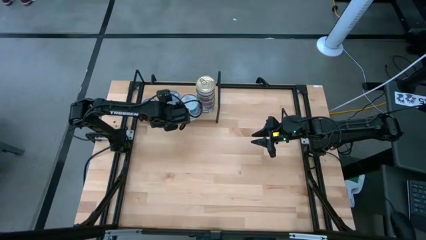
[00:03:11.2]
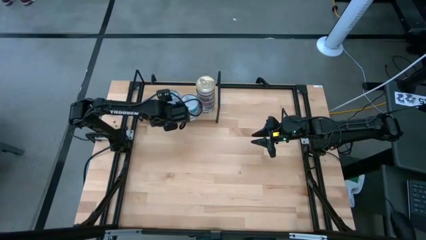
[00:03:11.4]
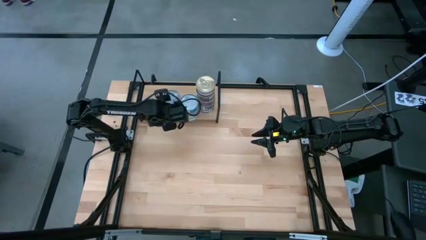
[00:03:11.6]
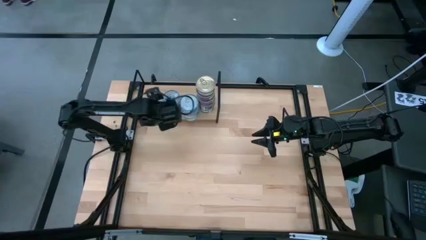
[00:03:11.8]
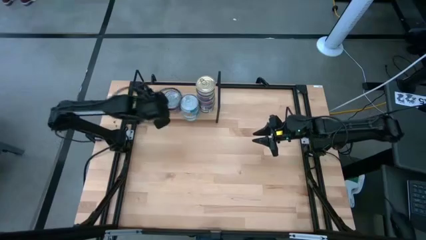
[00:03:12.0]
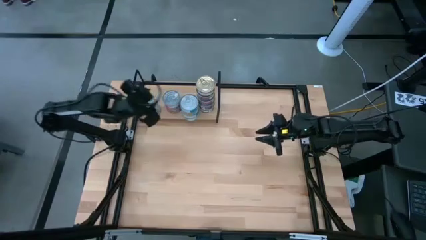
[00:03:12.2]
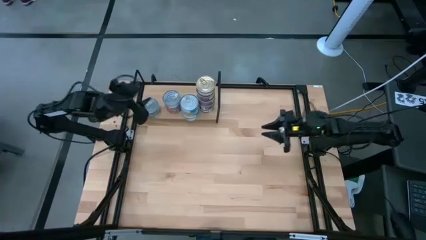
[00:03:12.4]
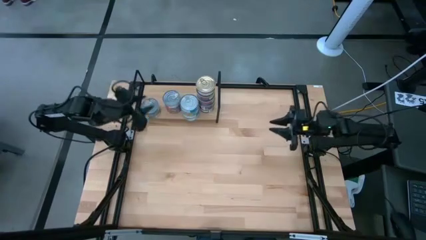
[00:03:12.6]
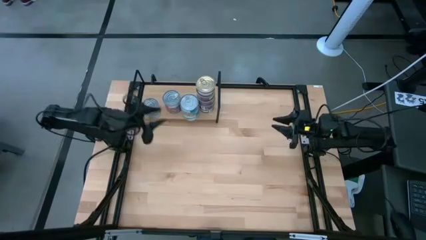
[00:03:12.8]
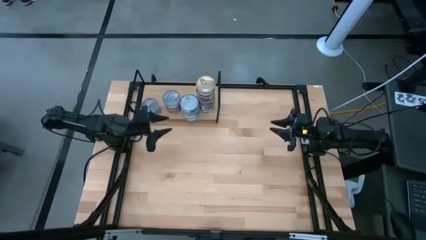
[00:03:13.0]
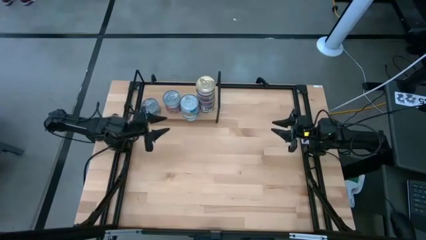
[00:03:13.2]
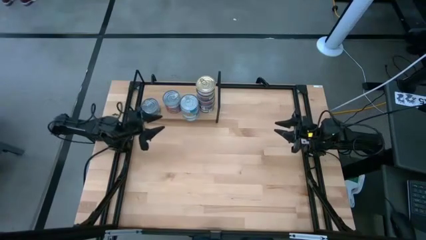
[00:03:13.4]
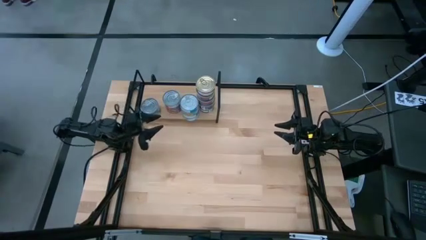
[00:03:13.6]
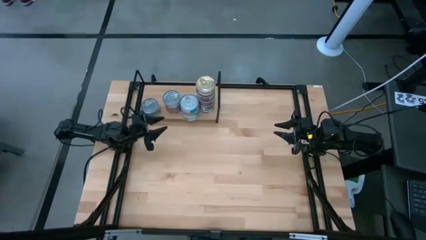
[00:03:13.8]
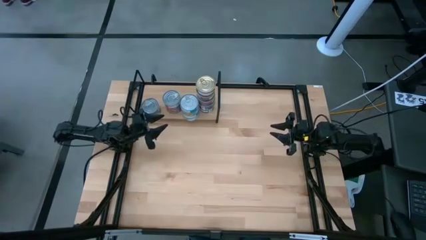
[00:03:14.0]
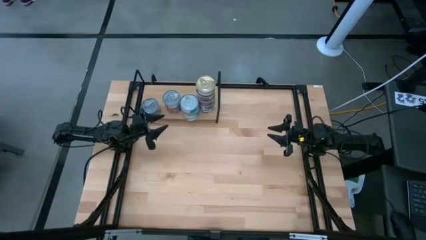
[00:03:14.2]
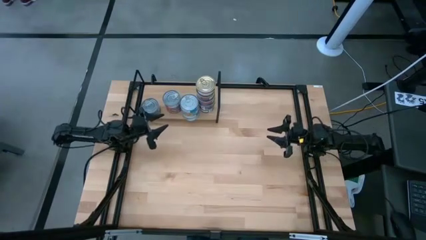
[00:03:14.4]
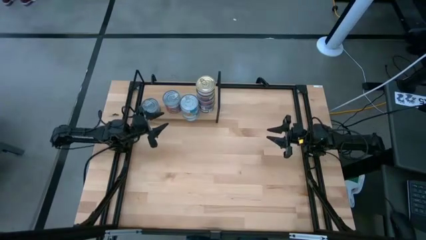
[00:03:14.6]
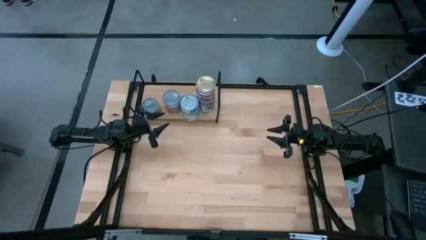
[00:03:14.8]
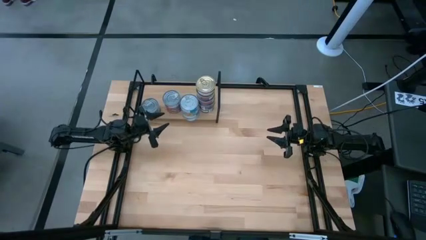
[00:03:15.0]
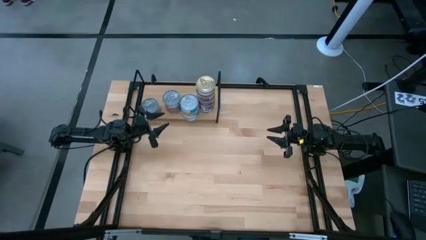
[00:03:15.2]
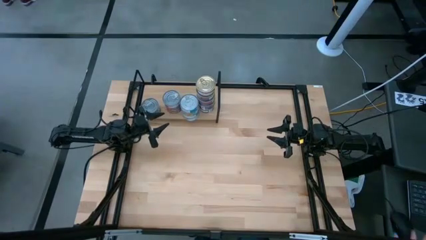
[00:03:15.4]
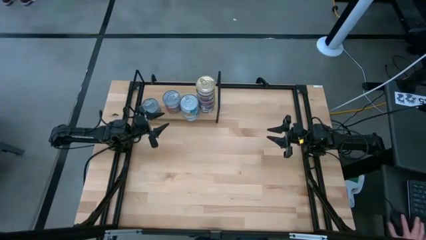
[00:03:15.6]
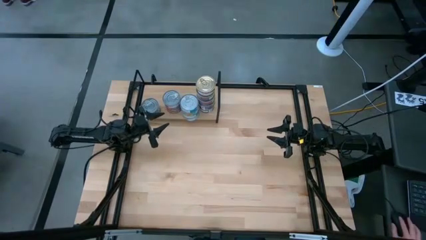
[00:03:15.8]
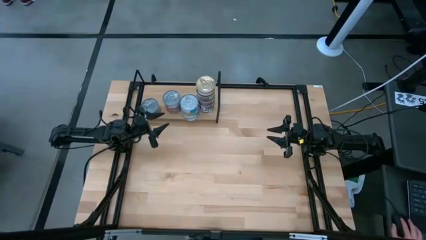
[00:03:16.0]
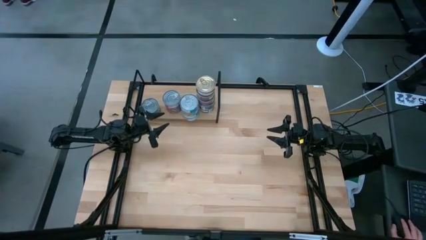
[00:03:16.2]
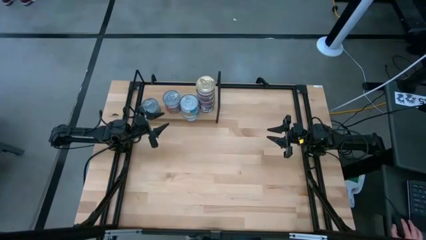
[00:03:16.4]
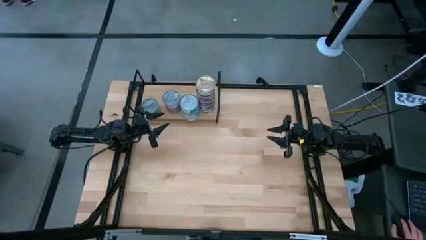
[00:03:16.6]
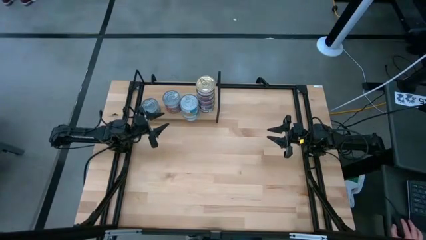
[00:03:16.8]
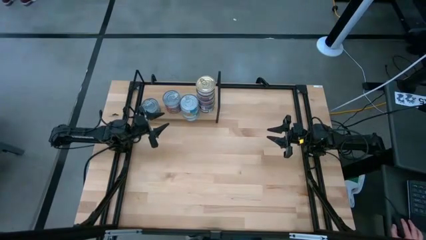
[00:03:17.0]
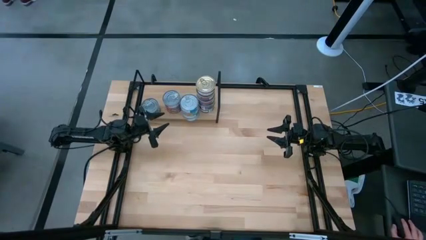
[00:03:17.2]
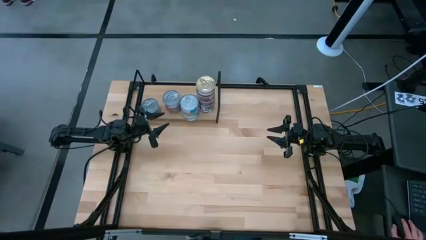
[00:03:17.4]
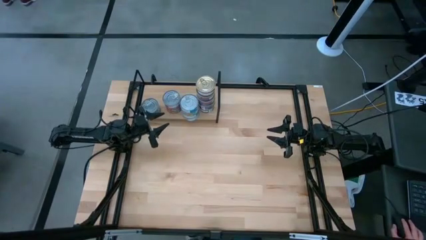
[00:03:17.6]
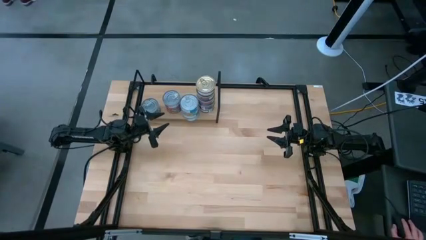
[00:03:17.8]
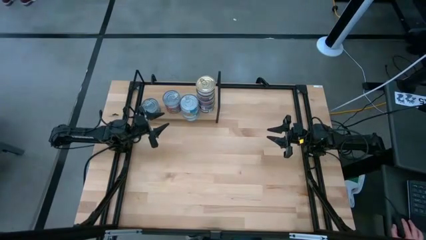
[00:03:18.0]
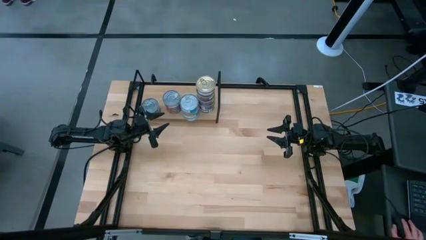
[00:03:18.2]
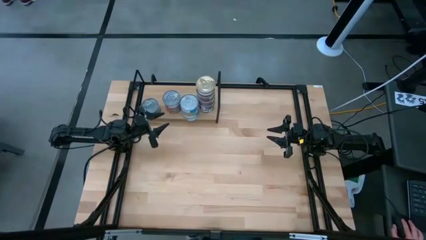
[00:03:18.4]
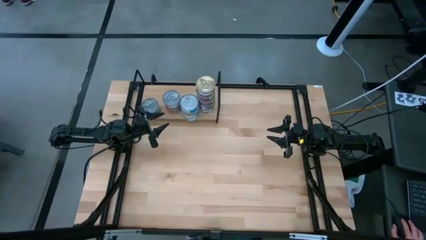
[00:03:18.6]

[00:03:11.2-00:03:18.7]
Task: Stack canned seafood by type on shelf
Return to Home Position
